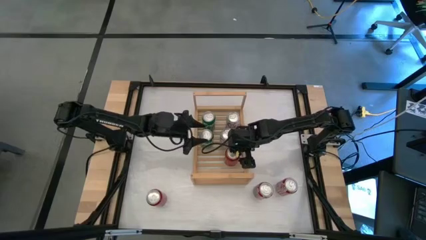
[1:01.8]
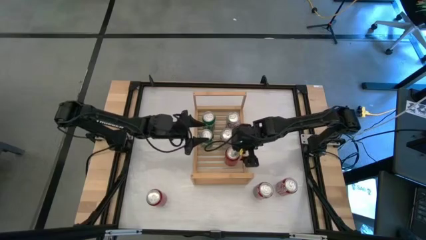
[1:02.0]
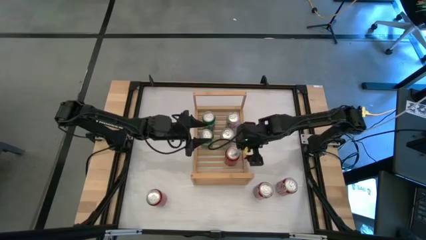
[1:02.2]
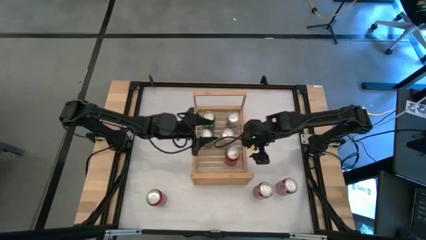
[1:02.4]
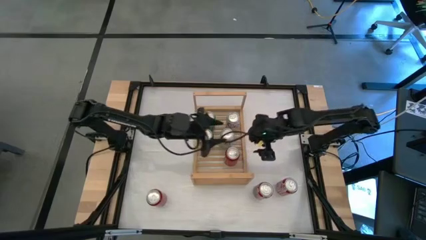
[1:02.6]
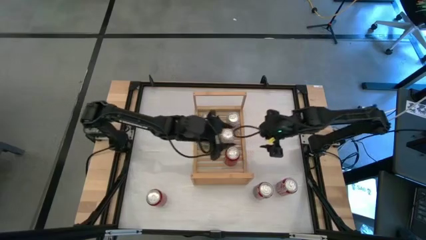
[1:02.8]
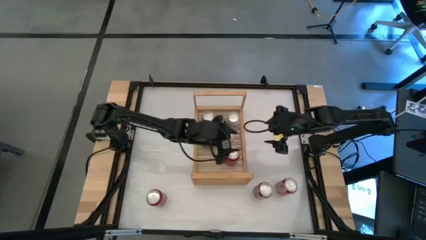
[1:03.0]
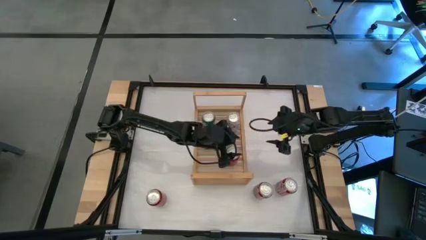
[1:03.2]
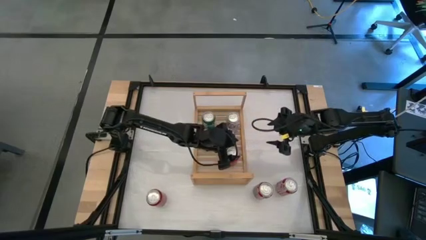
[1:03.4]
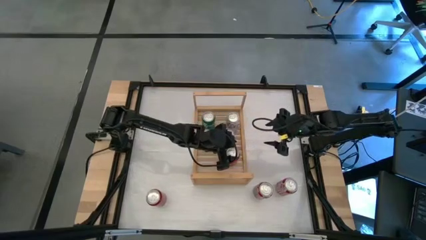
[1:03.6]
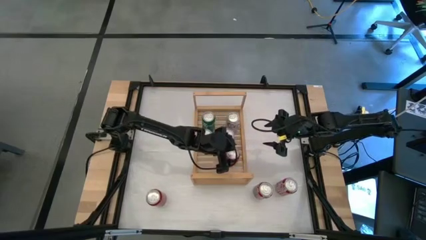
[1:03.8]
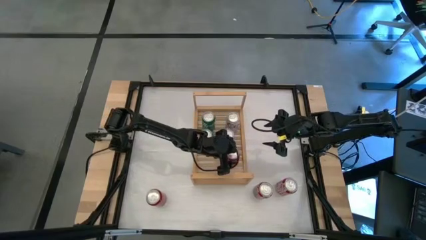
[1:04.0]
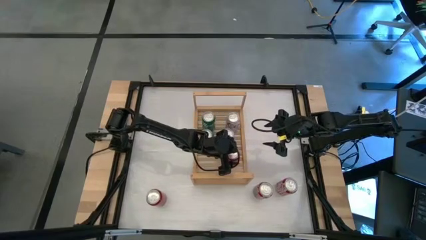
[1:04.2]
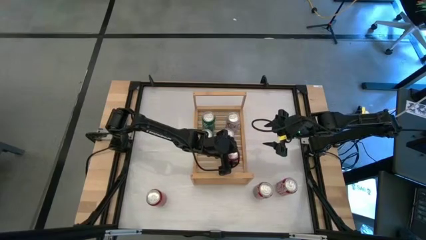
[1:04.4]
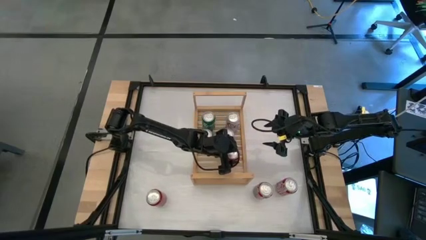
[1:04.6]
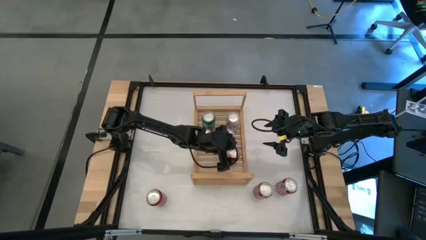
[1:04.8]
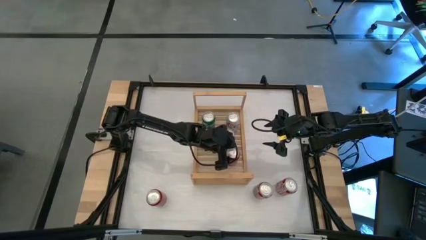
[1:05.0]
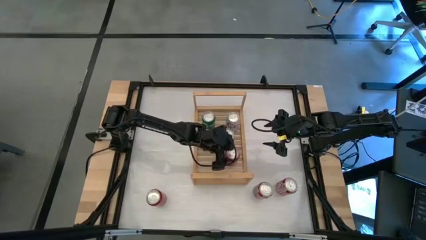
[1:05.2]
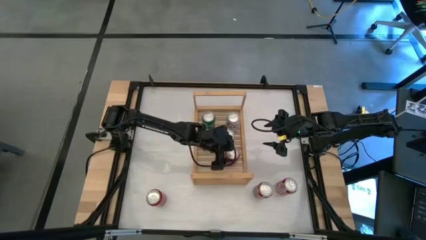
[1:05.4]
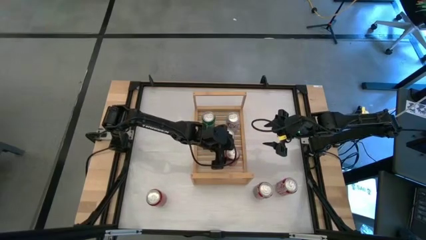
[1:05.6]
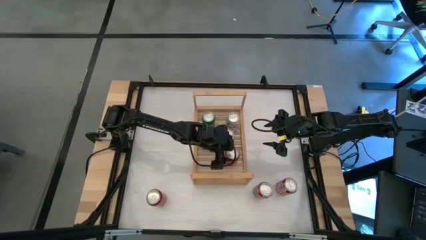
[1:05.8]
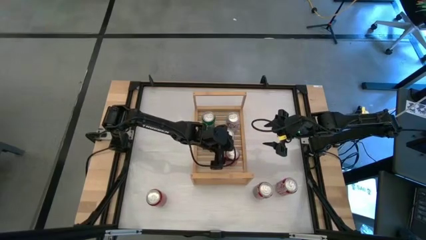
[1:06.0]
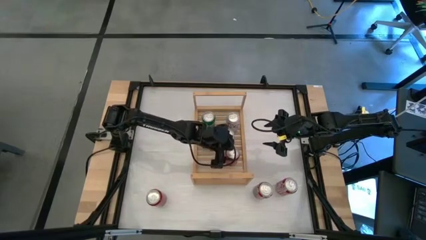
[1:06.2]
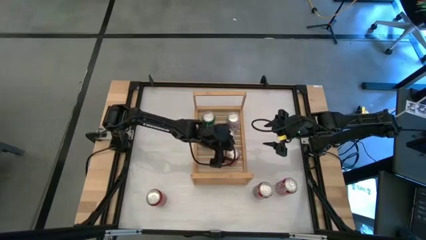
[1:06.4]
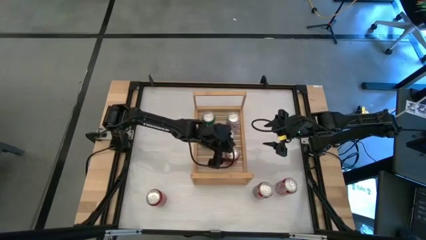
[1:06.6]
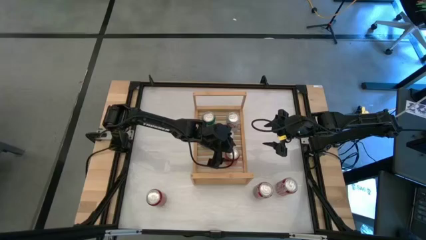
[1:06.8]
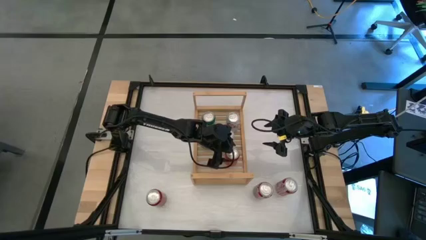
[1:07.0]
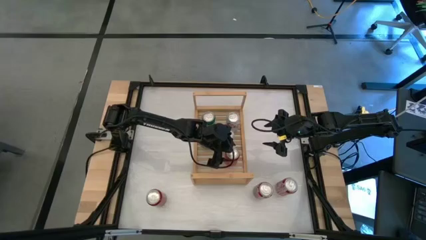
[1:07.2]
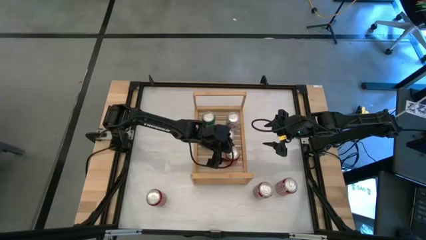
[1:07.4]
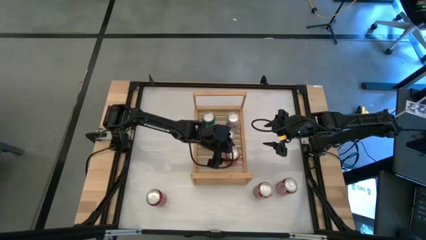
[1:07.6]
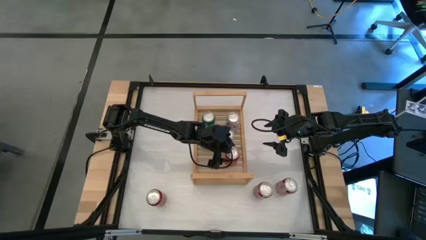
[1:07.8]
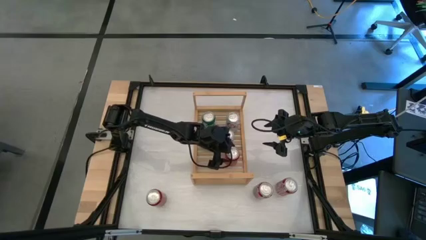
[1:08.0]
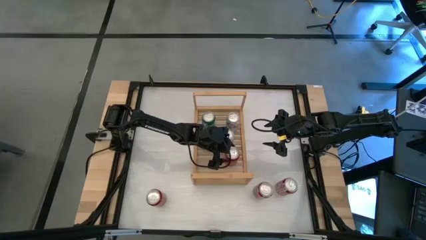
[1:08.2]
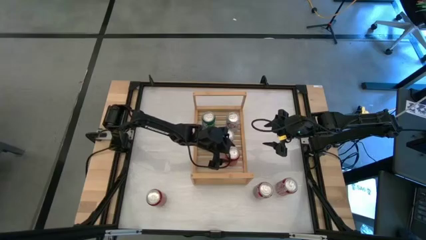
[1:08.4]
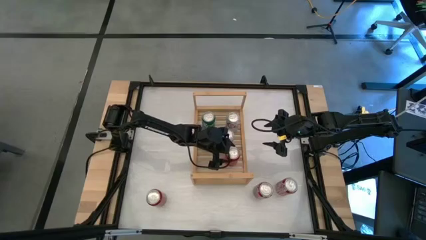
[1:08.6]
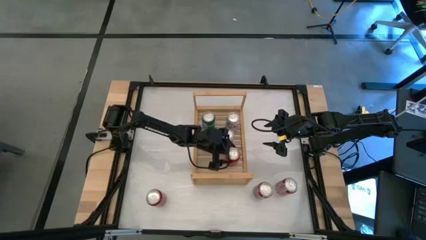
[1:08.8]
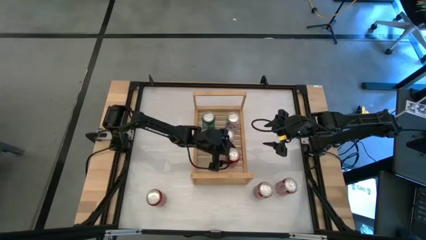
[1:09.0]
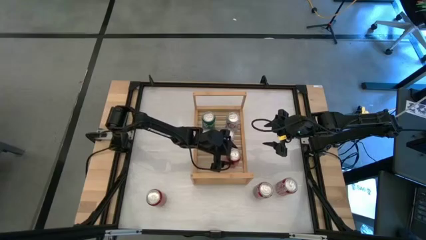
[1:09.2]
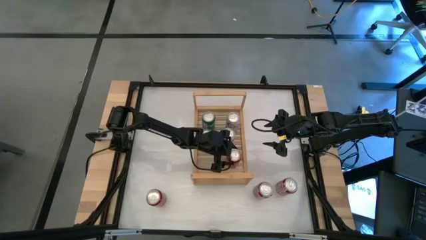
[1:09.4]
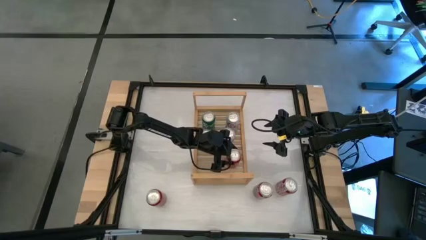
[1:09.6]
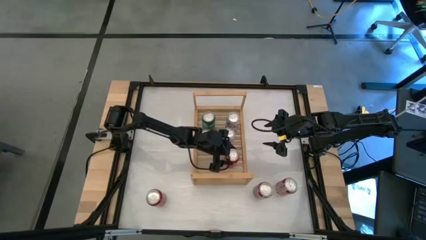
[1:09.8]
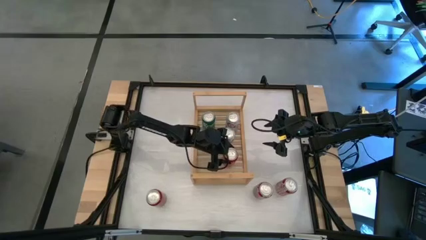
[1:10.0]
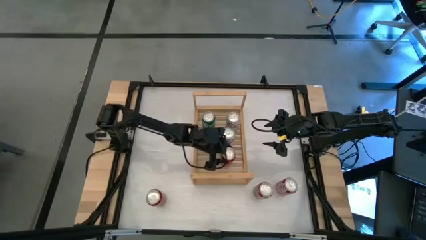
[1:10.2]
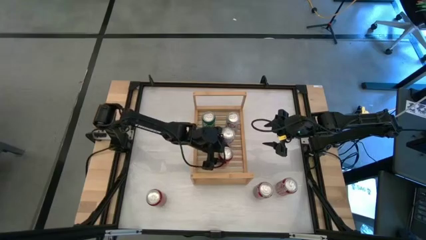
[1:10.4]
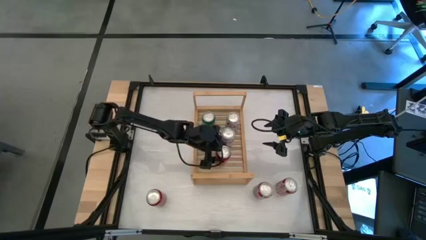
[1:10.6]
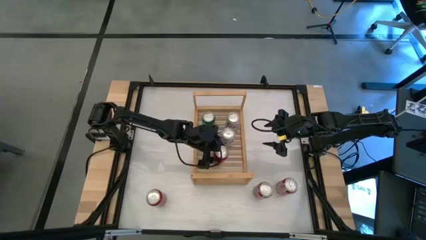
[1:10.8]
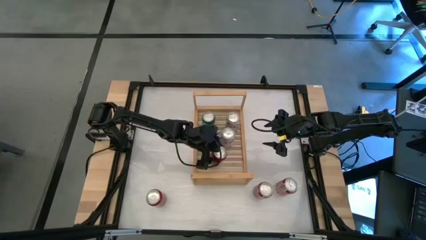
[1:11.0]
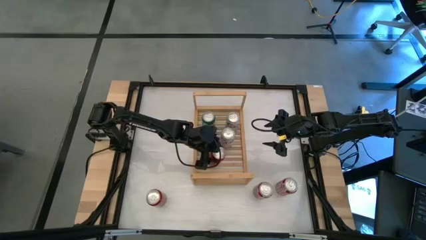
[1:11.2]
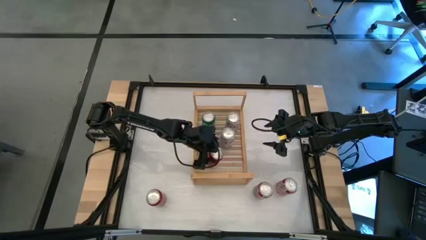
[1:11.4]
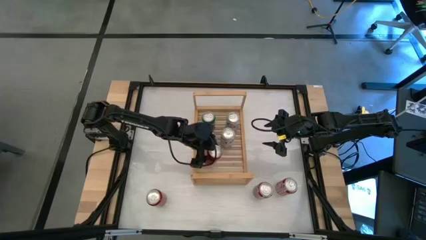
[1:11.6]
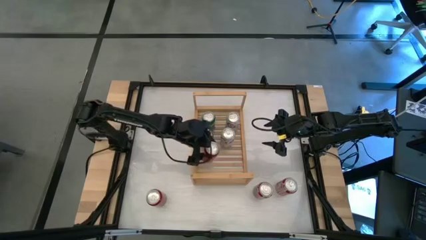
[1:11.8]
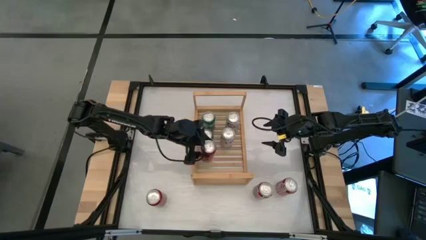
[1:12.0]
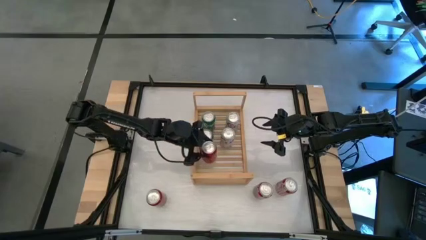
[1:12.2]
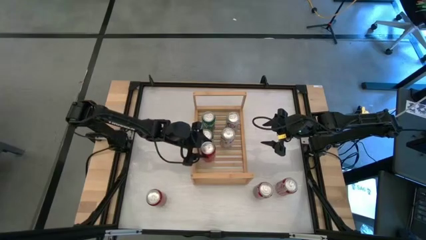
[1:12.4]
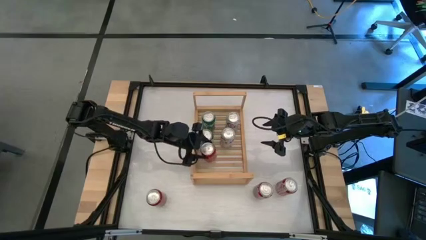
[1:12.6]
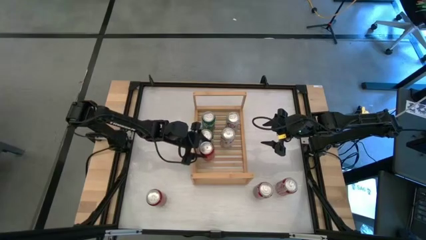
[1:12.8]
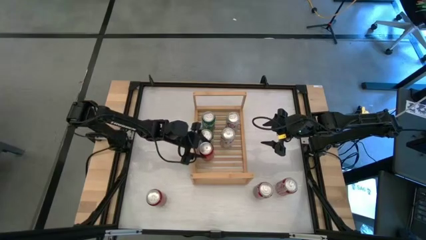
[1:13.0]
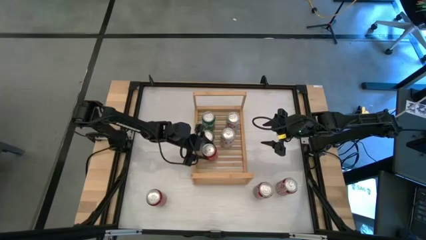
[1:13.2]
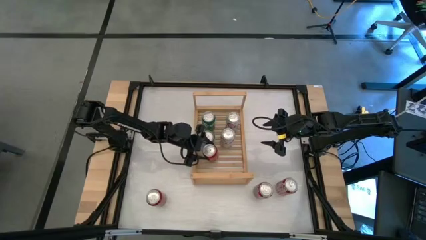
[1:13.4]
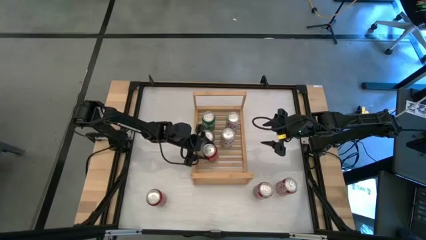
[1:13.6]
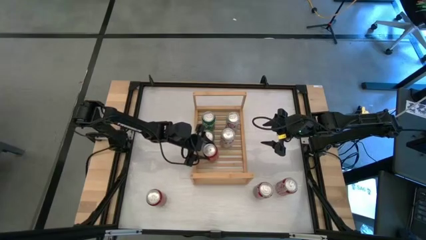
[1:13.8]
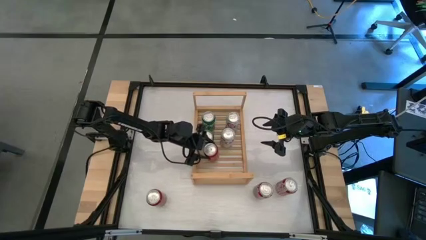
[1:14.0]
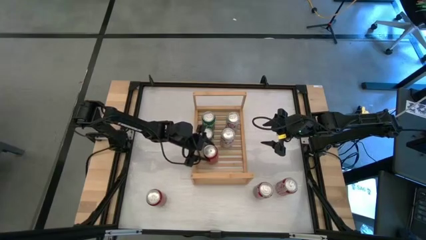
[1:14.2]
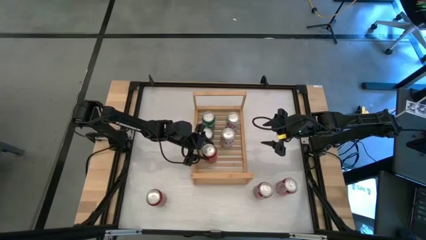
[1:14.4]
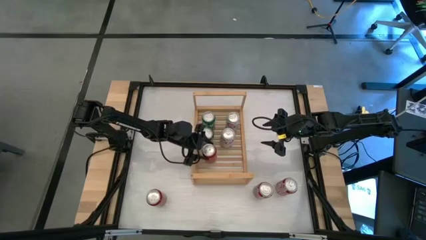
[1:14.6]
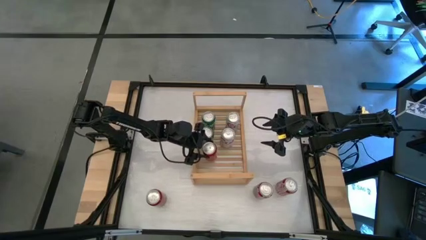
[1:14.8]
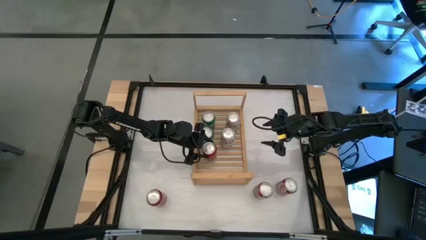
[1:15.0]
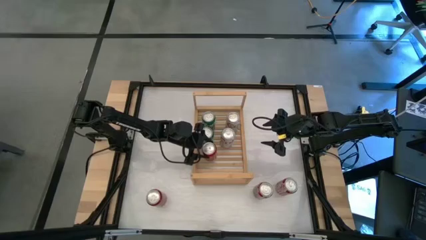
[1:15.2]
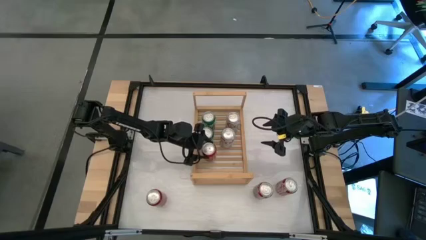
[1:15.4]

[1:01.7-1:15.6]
Task: Place canned beverage on shelf
Adjust the red soda can on the shelf

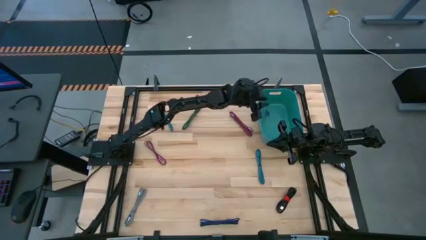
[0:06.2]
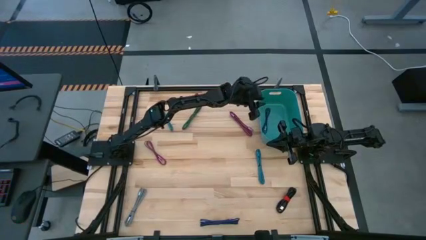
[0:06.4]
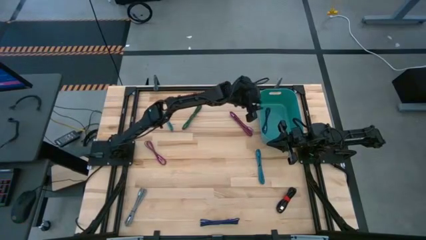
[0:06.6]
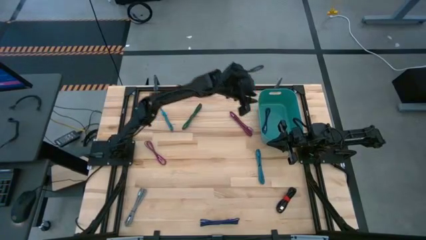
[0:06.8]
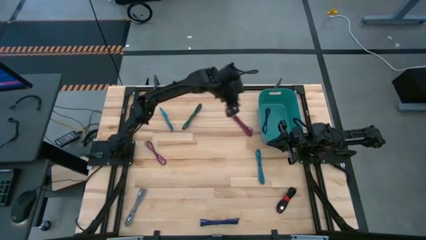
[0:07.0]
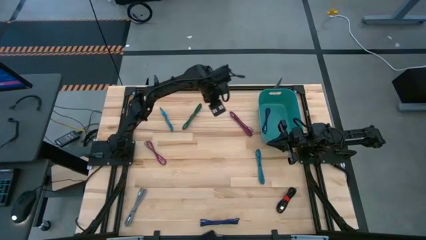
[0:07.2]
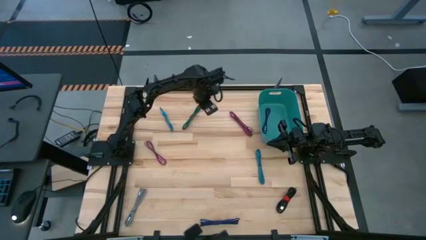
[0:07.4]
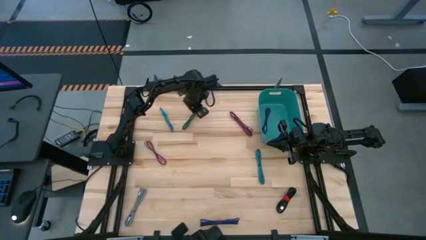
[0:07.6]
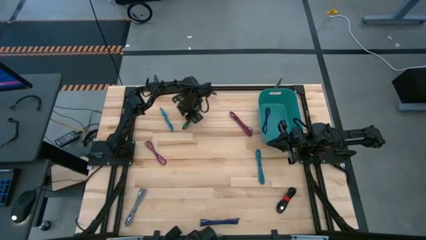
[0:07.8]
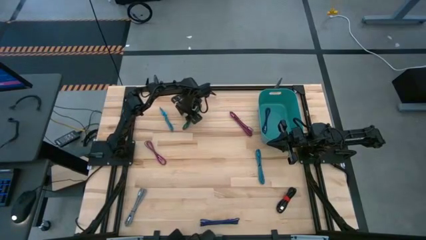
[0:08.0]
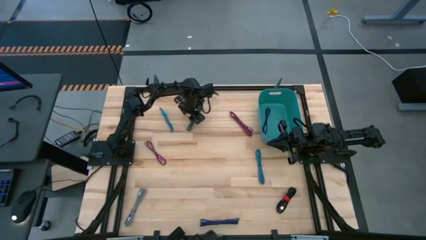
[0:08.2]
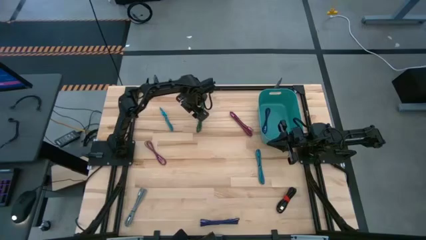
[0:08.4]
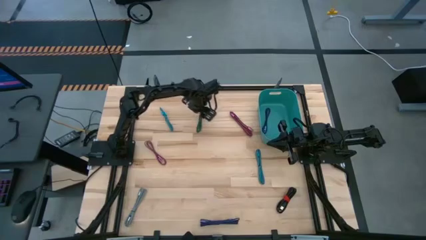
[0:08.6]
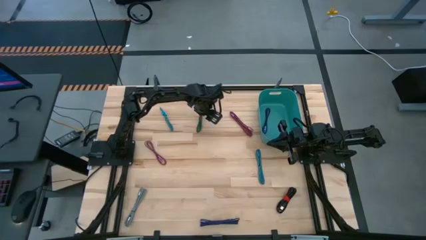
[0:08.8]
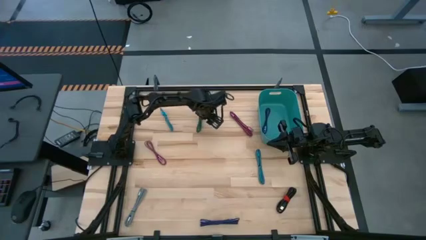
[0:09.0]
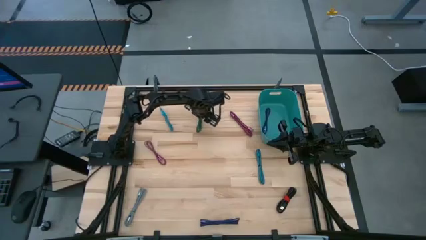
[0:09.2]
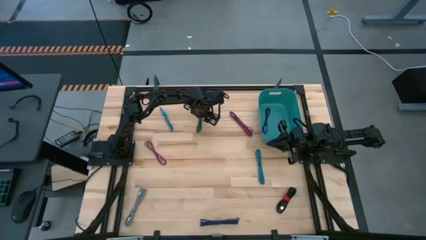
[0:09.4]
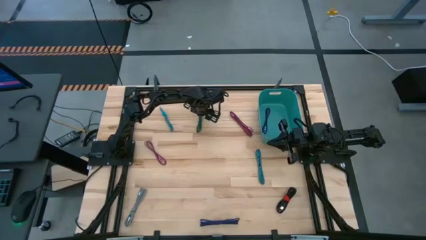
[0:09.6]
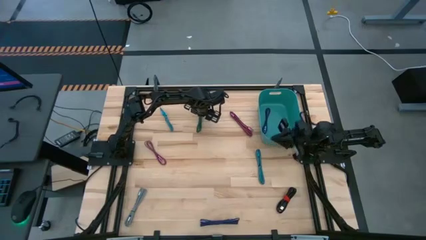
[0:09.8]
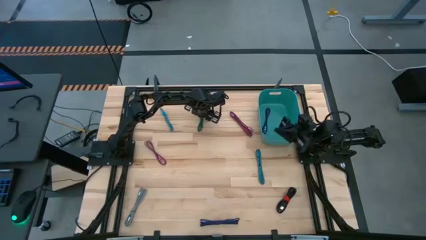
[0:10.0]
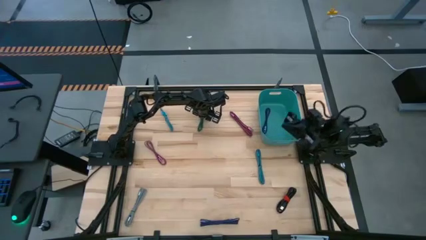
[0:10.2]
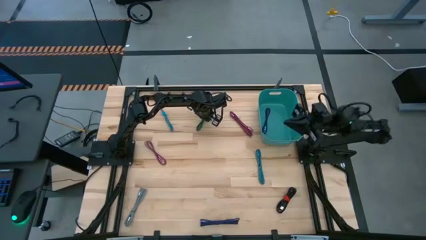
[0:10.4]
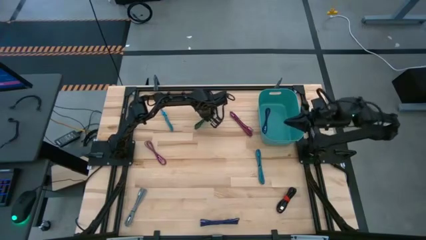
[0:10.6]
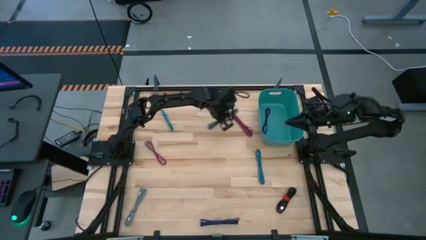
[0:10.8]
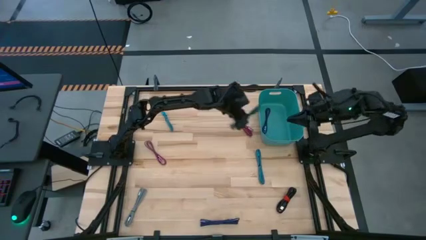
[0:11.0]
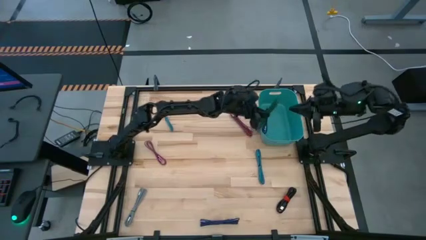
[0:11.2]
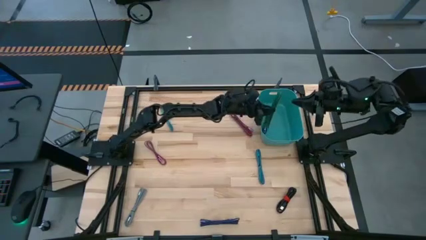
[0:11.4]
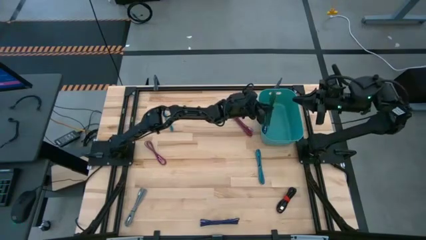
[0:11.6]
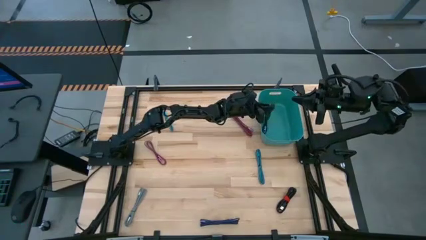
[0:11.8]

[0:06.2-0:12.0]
Task: Pick and place USB-C Cables
Put the green charger cable into the green bin
